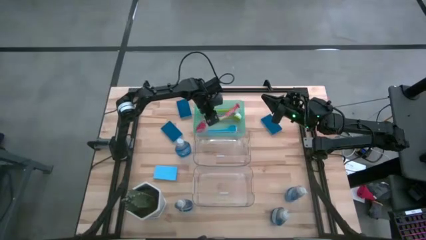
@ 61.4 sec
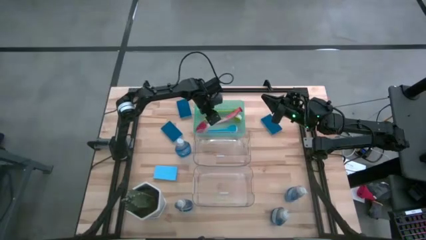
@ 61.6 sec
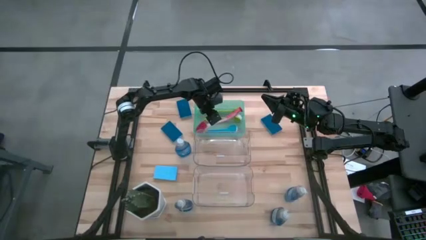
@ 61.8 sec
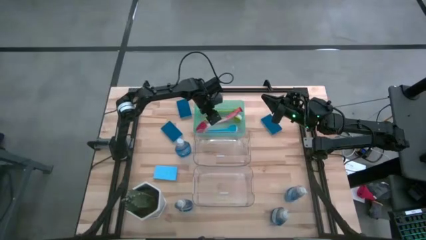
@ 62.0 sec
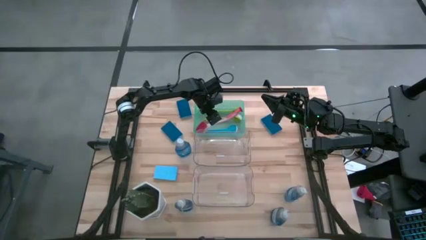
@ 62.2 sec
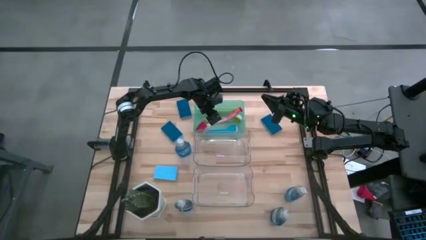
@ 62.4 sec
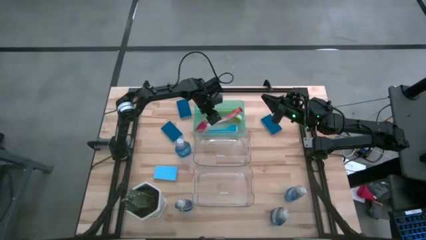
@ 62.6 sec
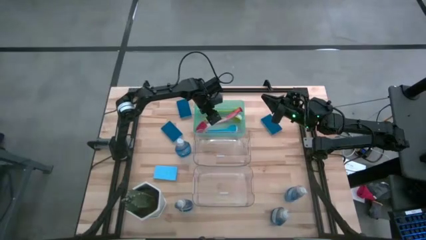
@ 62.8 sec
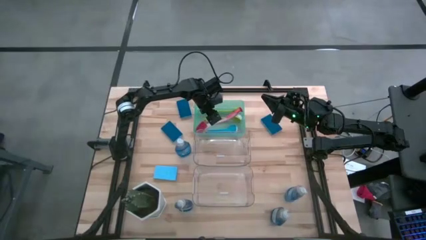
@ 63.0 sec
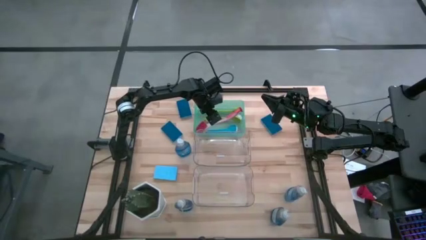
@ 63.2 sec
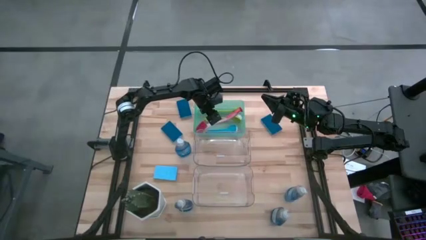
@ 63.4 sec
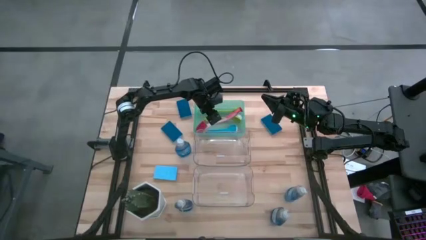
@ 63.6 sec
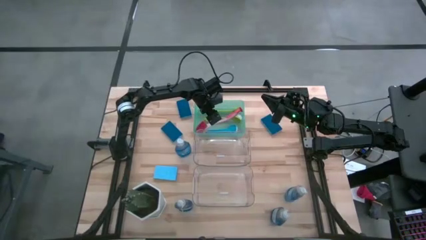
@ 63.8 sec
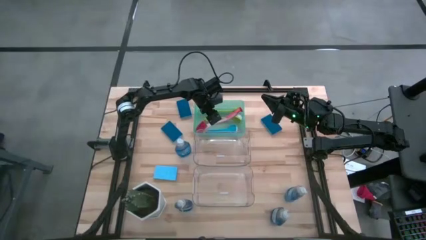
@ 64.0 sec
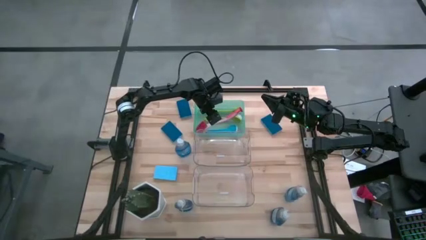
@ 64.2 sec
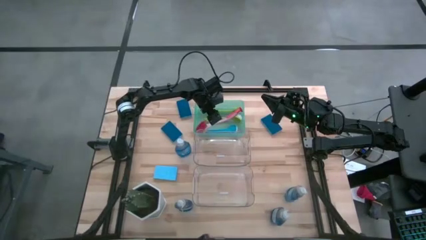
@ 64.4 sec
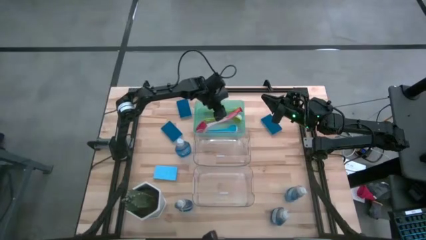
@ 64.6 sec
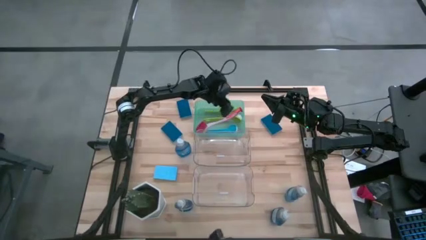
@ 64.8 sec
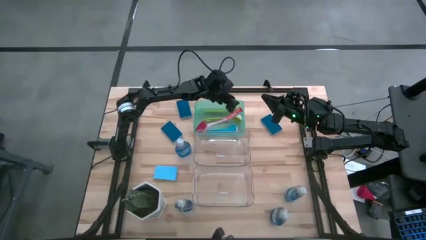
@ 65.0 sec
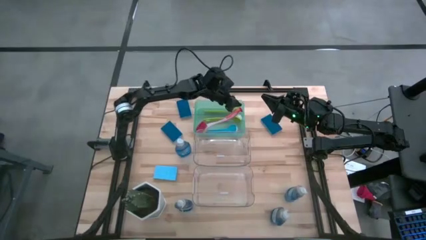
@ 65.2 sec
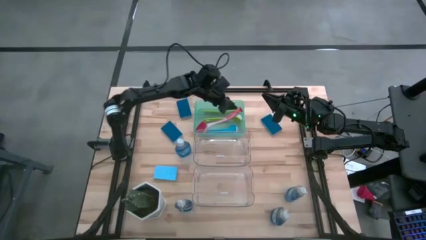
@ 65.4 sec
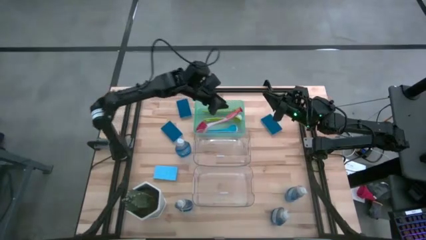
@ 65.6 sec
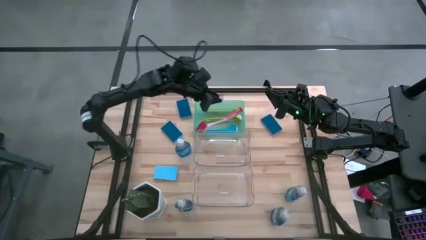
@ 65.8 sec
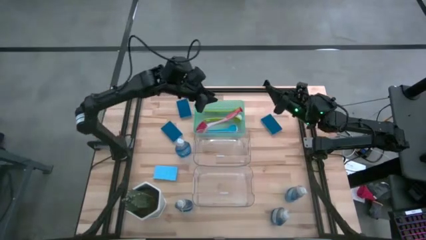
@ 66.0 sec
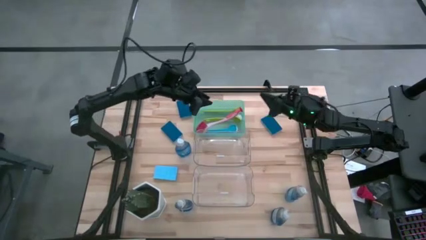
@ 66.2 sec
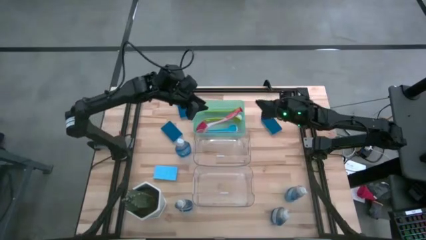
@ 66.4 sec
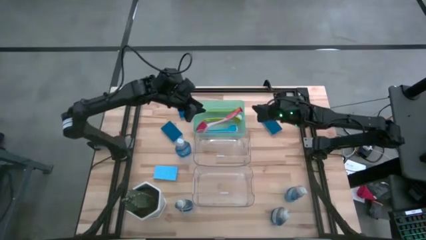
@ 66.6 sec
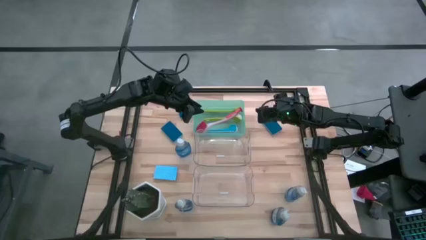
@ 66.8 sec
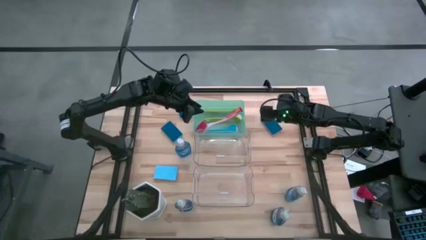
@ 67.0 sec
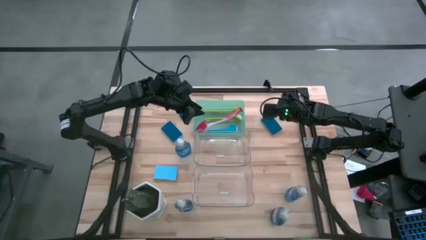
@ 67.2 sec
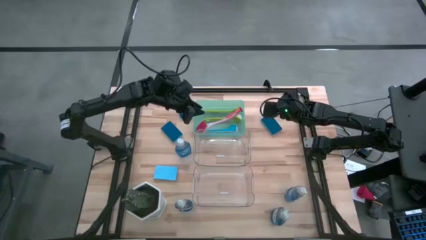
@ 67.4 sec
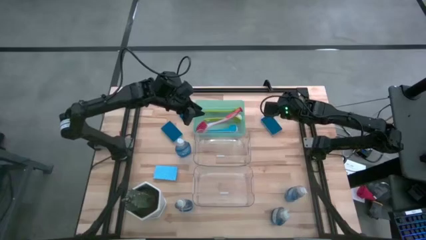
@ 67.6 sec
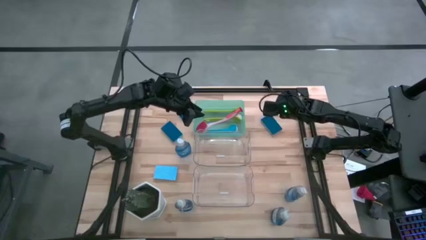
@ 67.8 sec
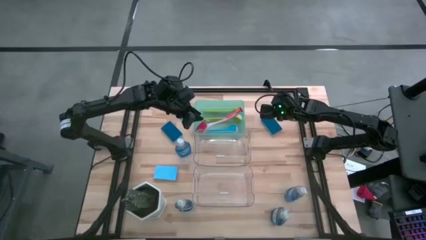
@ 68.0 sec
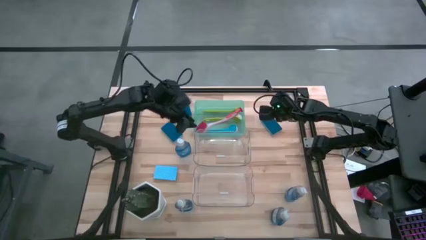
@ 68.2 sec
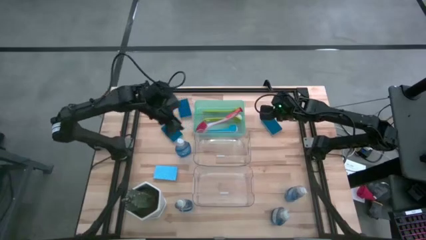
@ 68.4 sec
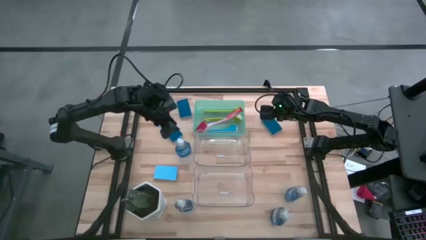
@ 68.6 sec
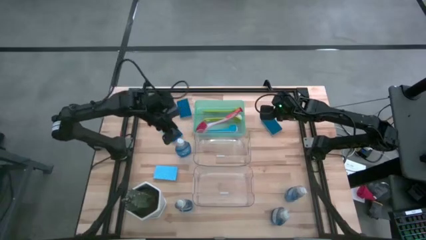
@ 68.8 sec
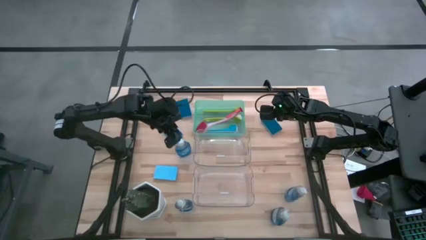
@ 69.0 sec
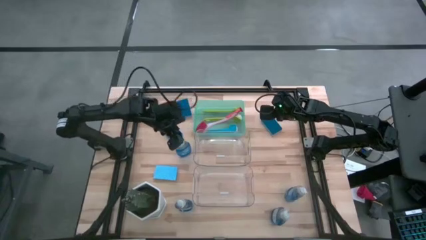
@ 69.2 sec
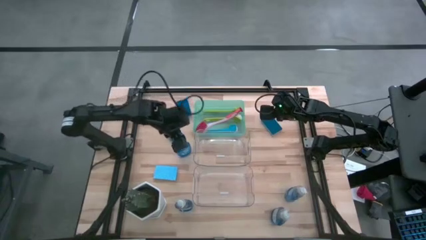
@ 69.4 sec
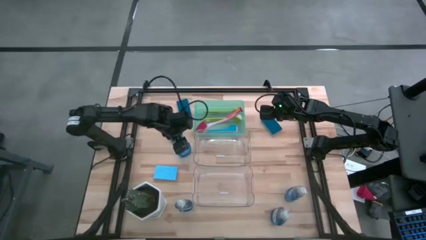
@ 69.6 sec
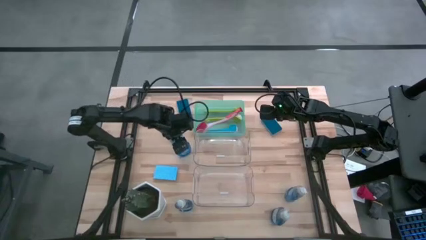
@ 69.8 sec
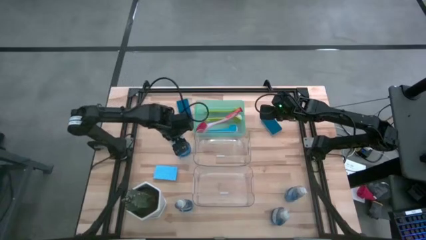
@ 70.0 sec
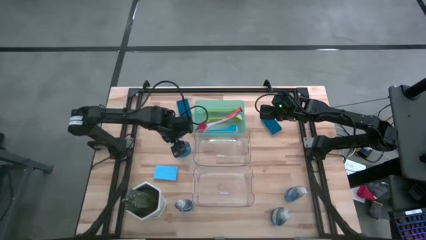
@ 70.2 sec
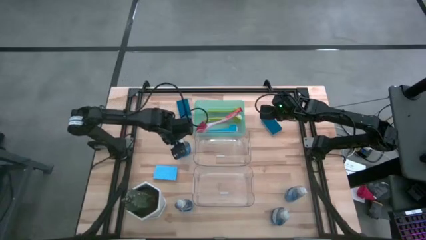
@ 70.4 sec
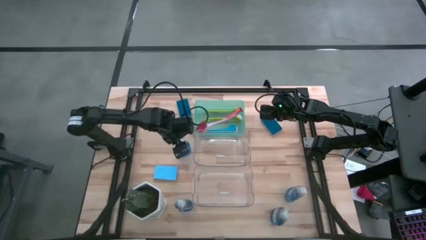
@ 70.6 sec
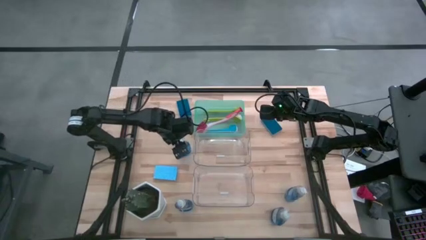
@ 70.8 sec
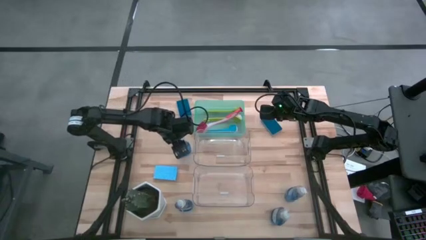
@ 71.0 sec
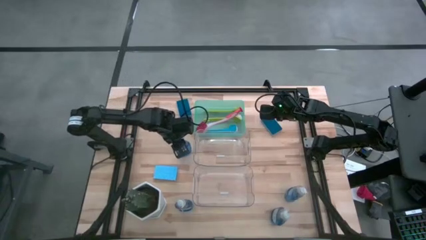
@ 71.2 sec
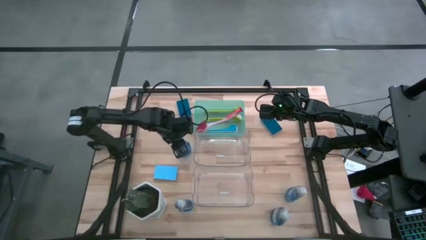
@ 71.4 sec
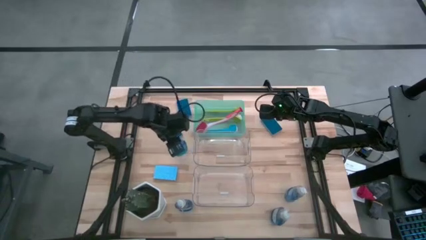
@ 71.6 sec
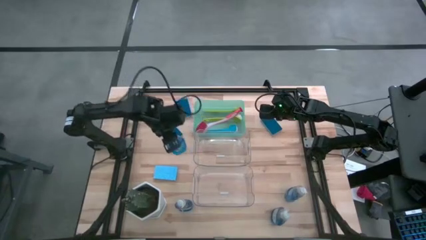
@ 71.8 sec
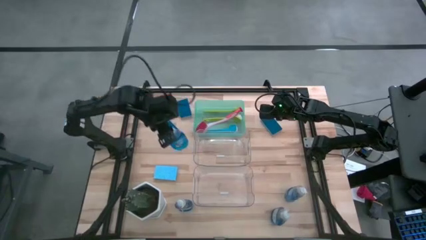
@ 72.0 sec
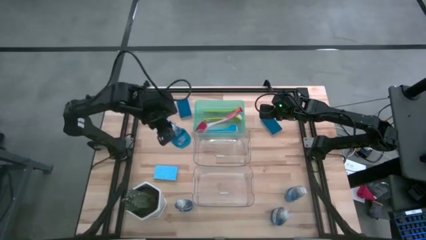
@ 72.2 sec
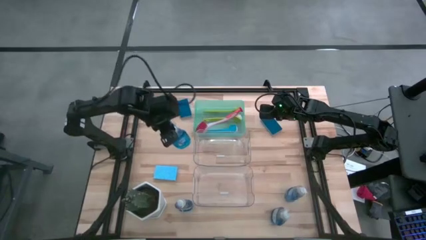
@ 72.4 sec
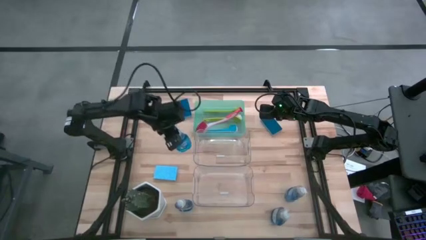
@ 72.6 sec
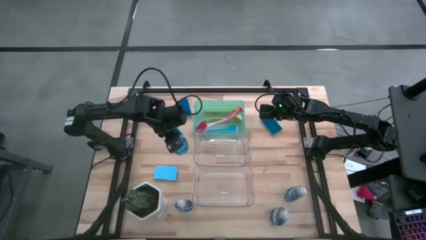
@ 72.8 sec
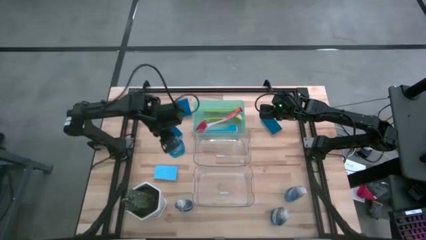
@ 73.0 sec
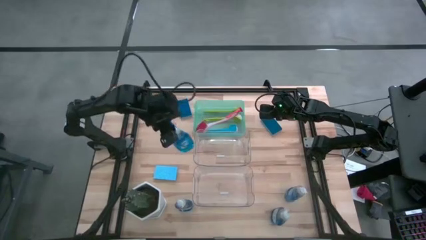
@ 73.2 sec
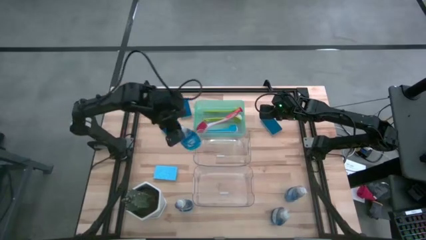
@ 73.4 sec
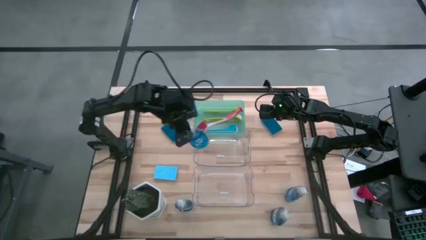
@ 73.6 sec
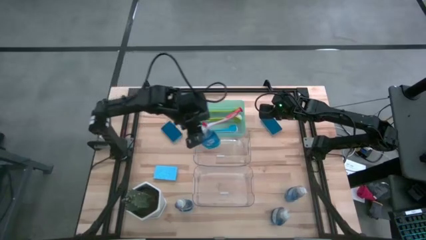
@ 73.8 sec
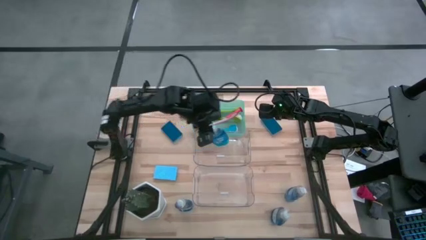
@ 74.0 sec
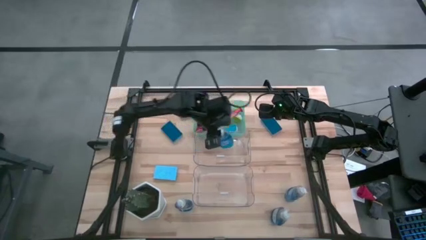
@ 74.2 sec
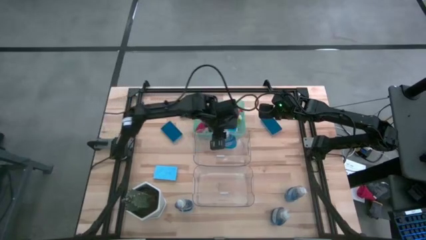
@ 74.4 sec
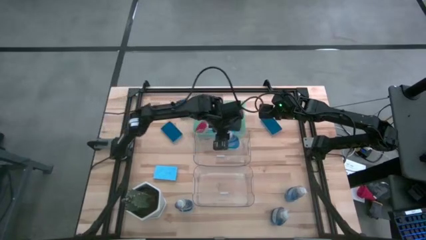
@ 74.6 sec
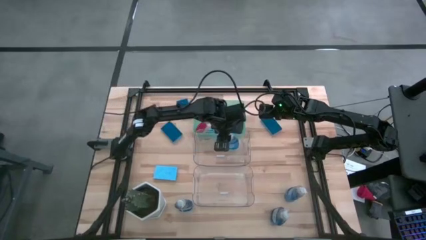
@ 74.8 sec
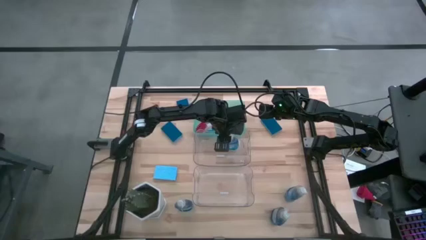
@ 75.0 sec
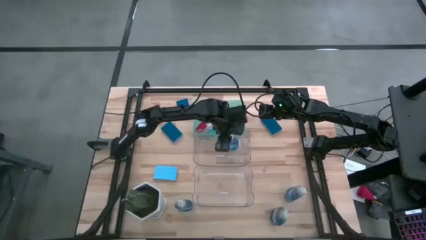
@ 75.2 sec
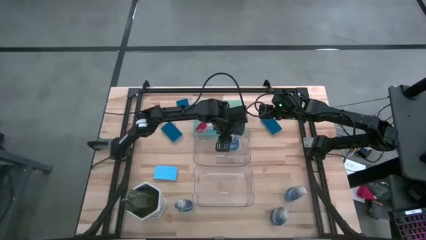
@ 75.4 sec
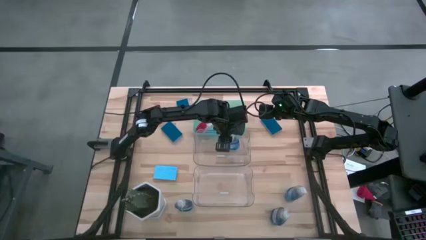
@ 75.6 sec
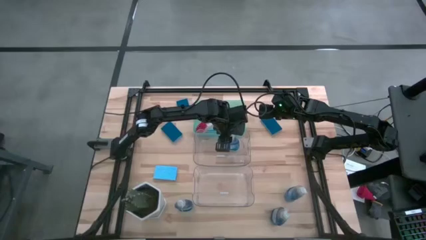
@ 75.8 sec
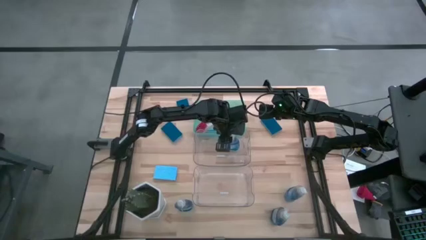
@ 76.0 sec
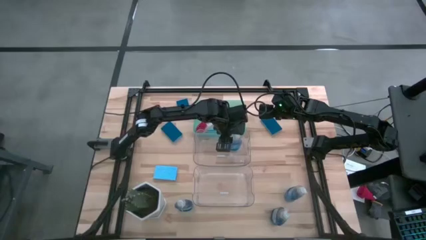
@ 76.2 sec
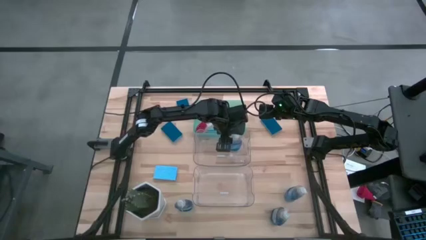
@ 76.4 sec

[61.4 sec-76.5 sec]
Task: Pick & Place Kitchen Sink Supplies
Put the blue dishwasher liquid into the top transparent bin
